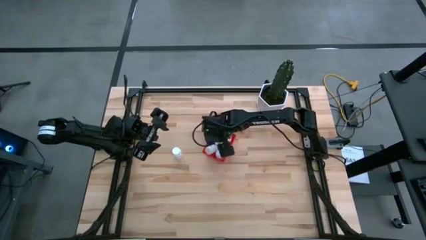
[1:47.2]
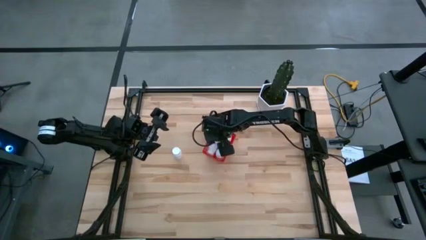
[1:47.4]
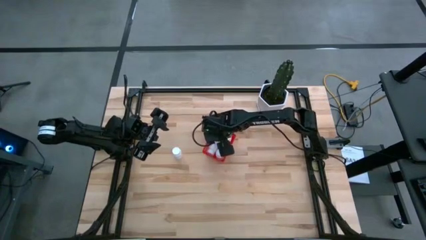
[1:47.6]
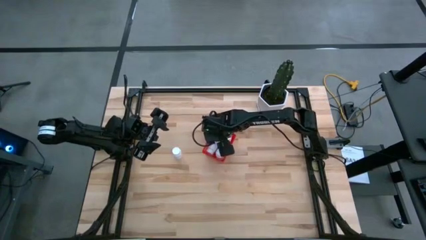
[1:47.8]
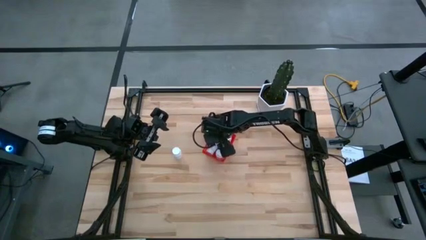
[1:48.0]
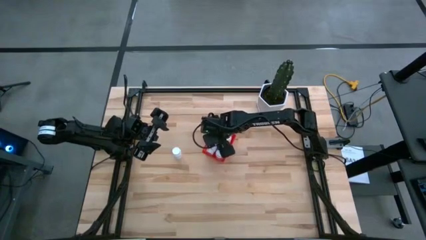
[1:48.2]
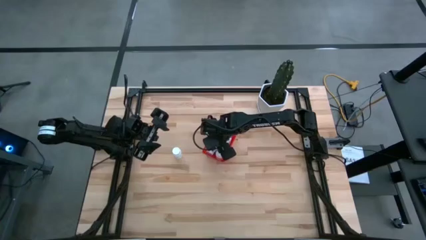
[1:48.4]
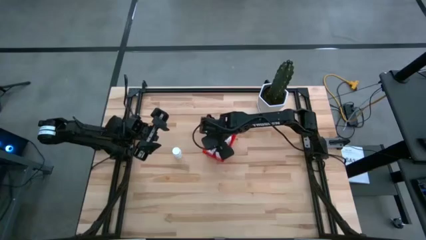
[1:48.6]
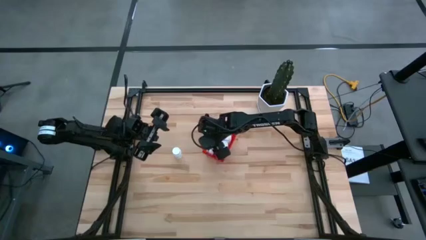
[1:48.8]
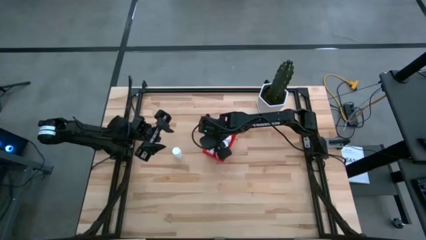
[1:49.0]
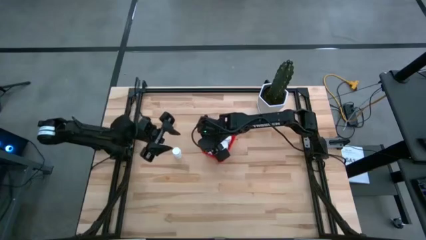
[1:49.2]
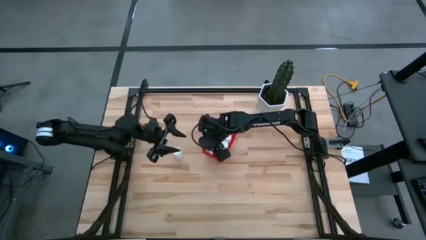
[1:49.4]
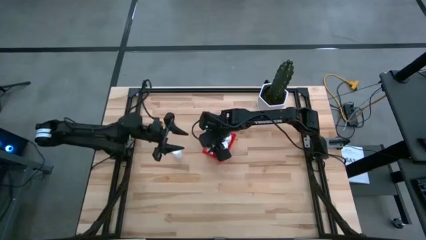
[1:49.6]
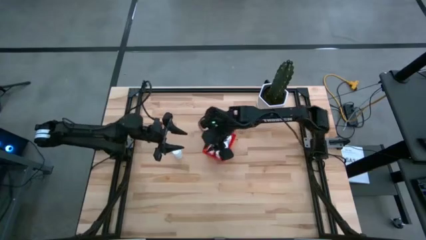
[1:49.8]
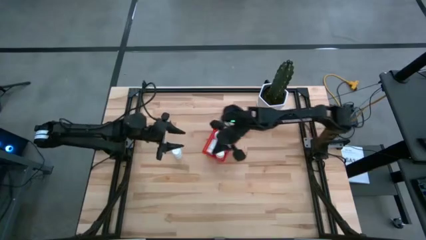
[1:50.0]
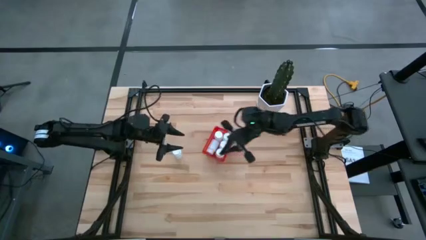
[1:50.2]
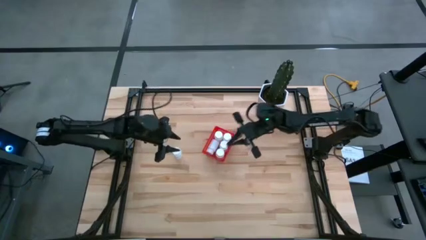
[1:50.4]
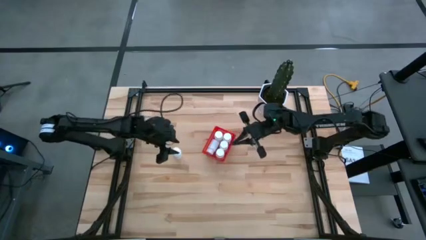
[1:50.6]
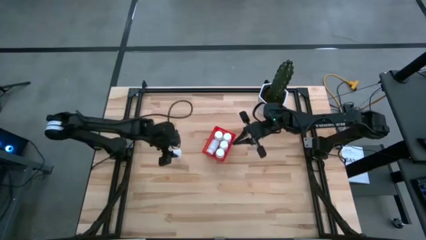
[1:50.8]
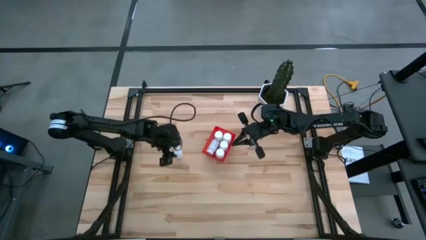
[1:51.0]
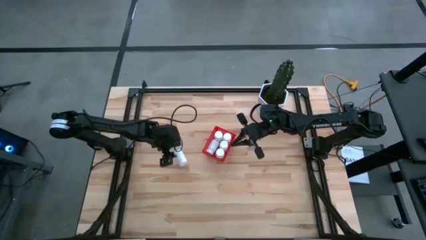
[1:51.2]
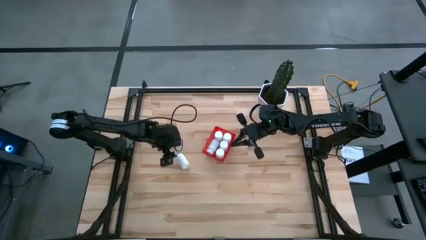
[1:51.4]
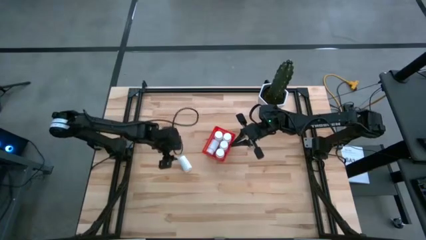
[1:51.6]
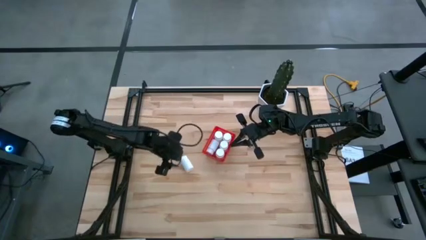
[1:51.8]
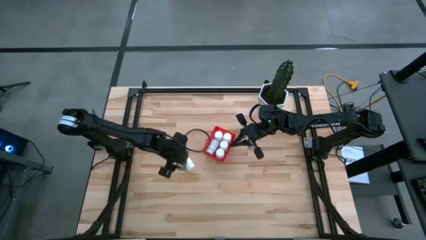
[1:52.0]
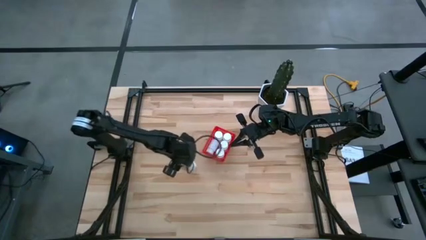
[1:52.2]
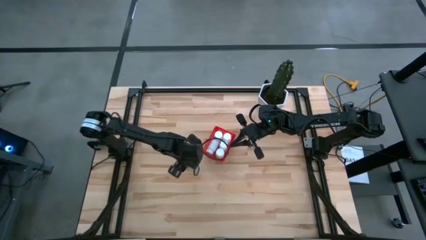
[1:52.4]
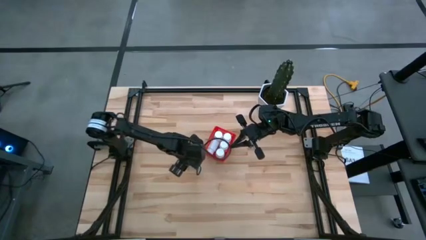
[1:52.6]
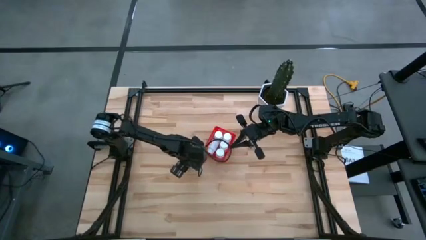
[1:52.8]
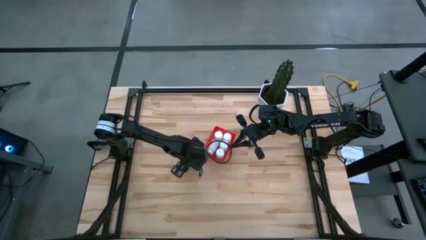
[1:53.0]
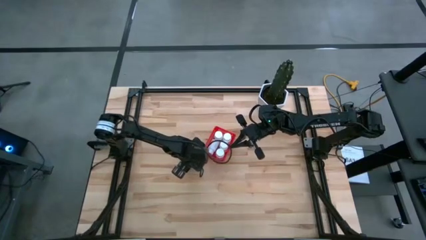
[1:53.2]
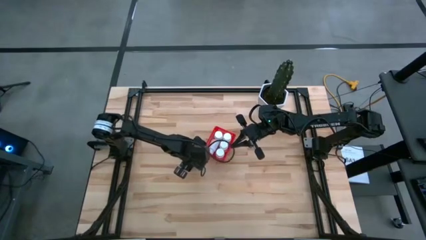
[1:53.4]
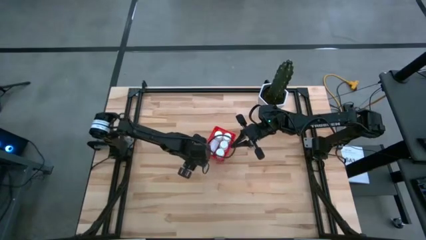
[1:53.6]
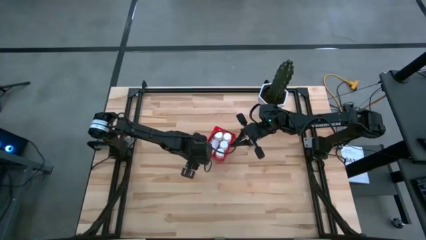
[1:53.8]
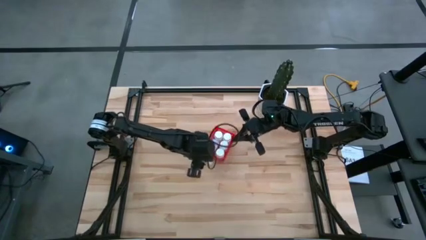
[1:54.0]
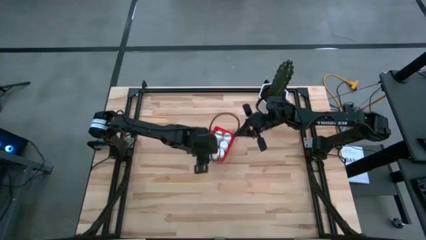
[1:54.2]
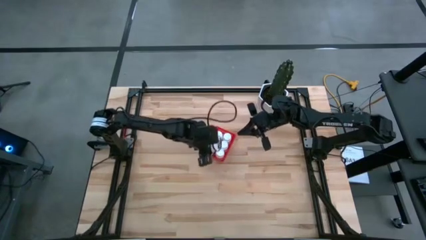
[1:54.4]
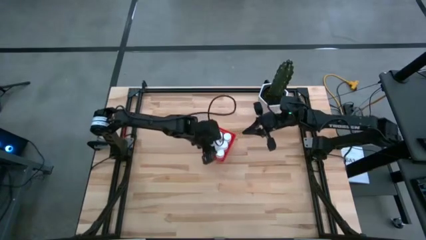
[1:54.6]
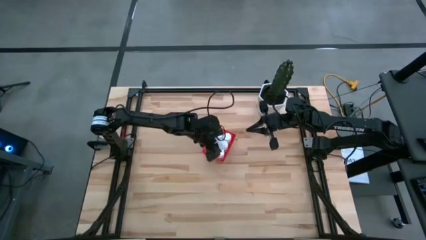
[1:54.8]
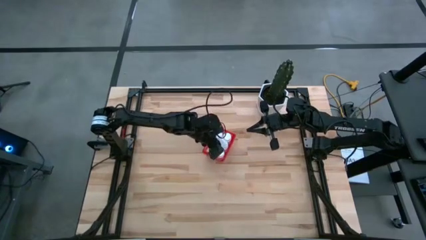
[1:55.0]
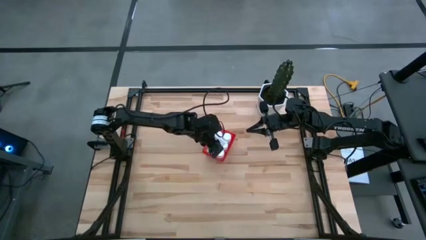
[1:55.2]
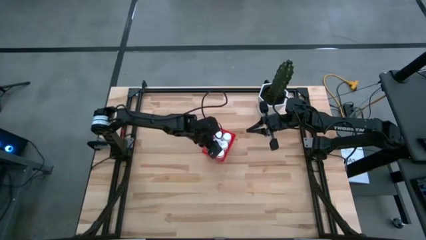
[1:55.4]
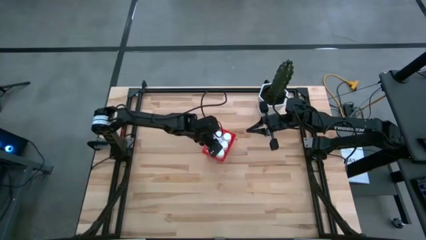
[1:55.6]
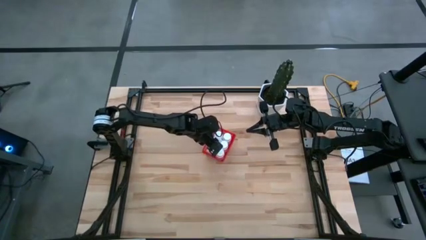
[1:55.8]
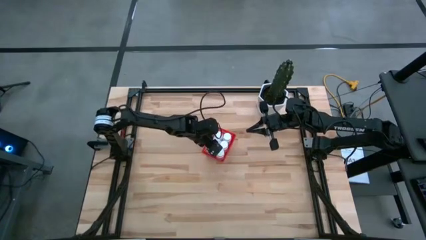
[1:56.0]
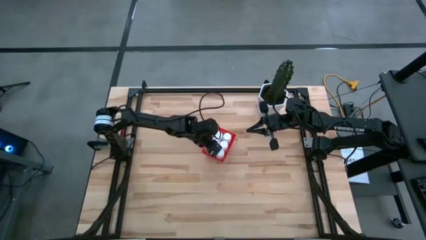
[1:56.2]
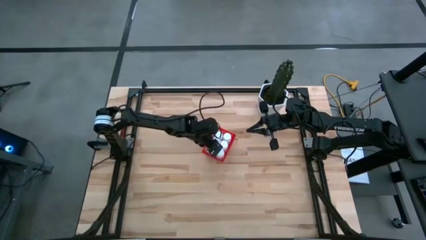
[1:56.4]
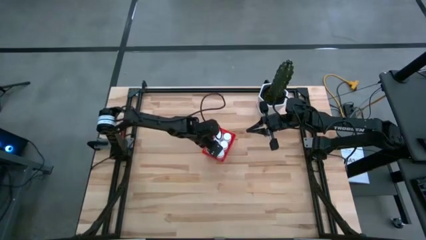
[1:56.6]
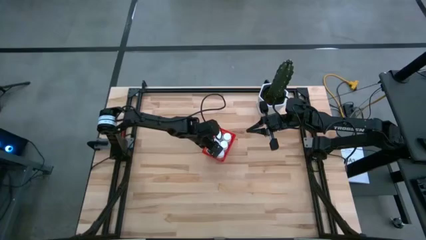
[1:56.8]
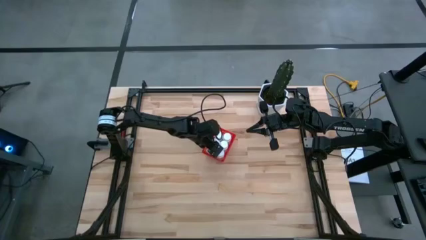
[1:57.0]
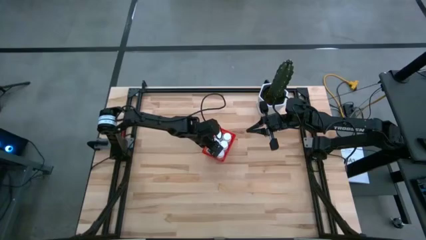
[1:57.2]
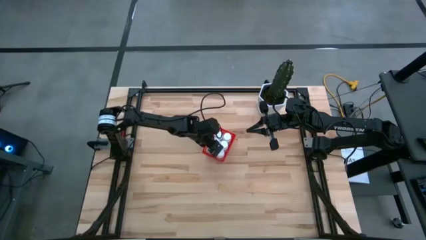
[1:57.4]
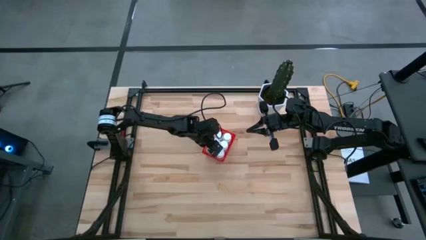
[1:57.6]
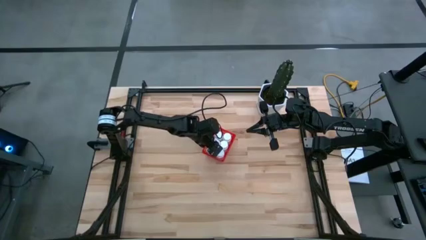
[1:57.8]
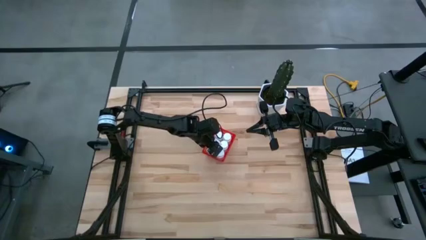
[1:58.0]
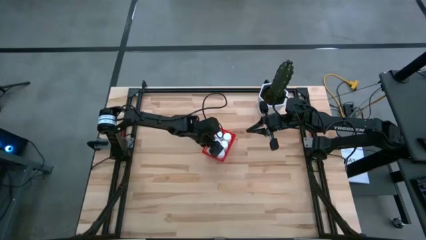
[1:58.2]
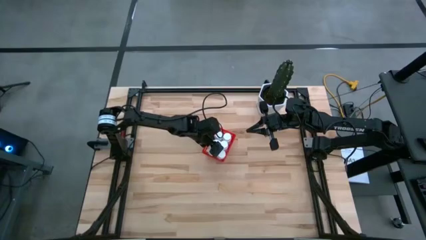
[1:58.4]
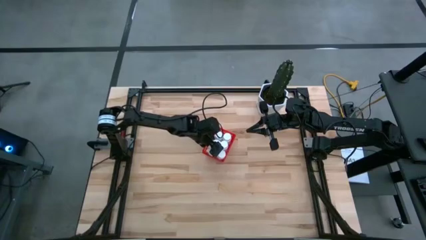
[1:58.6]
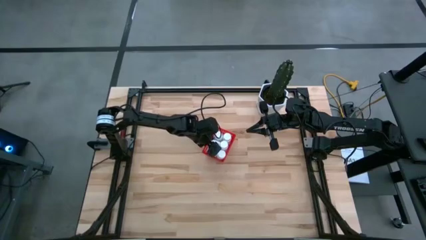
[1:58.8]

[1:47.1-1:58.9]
Task: Pick and place pill bottles into a basket
Put the pill bottle into the red bin

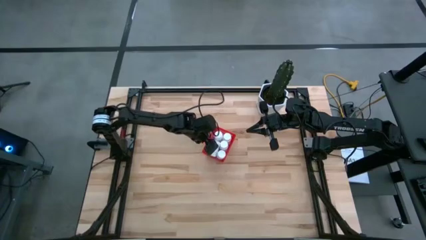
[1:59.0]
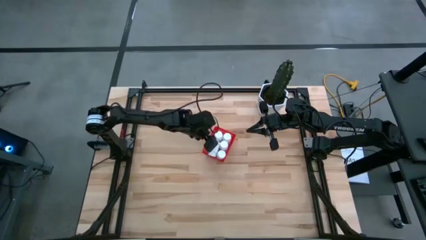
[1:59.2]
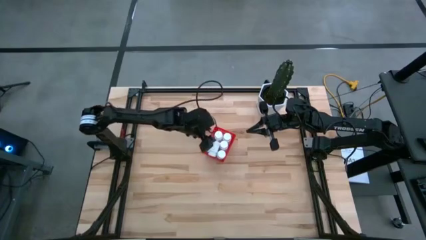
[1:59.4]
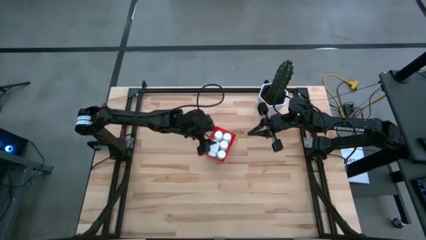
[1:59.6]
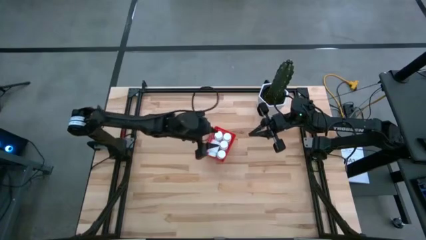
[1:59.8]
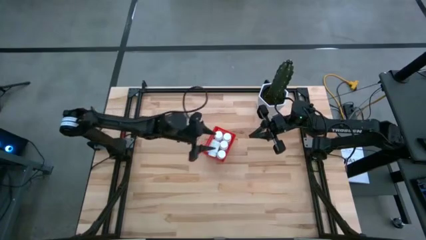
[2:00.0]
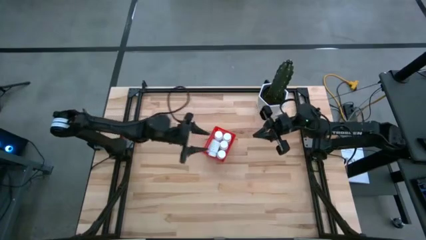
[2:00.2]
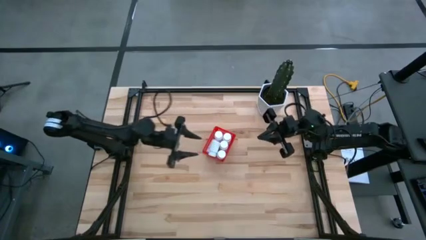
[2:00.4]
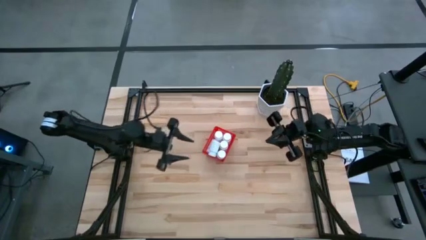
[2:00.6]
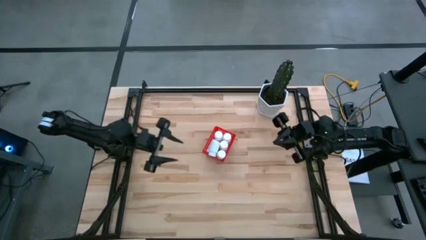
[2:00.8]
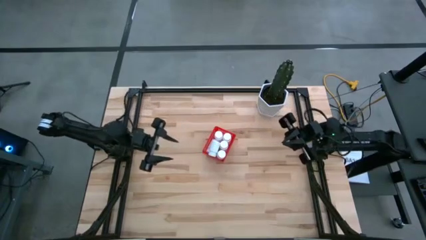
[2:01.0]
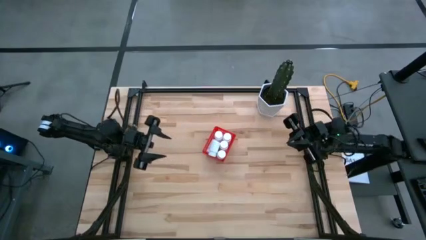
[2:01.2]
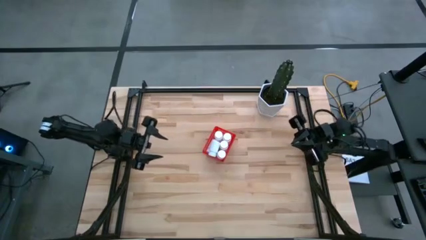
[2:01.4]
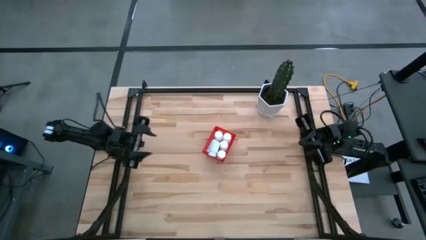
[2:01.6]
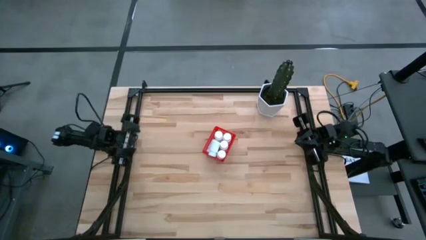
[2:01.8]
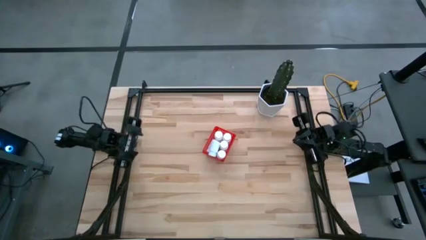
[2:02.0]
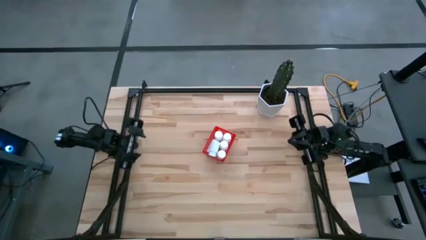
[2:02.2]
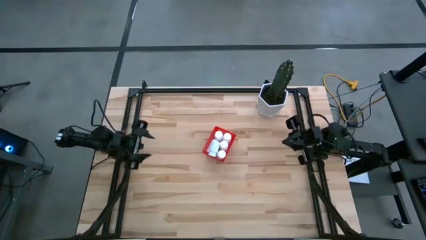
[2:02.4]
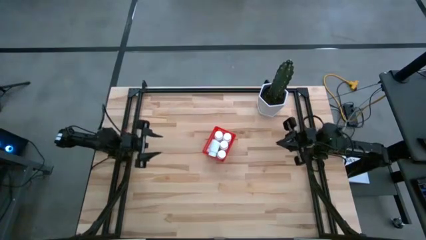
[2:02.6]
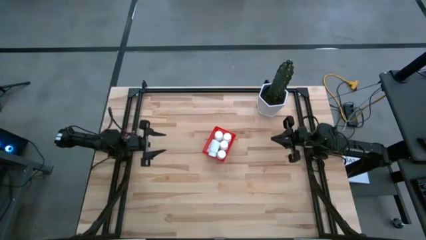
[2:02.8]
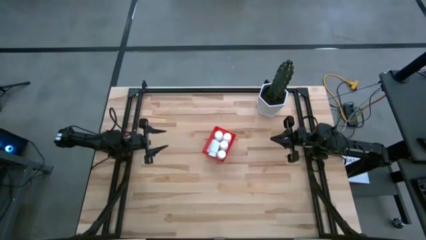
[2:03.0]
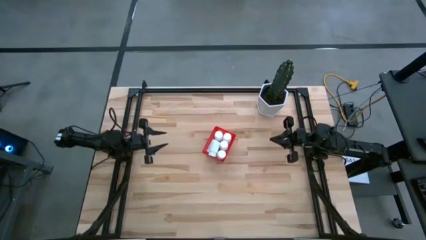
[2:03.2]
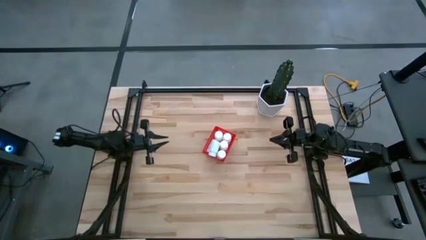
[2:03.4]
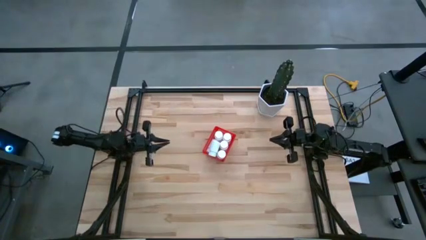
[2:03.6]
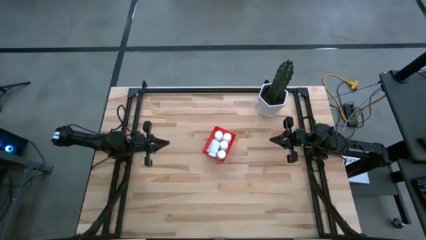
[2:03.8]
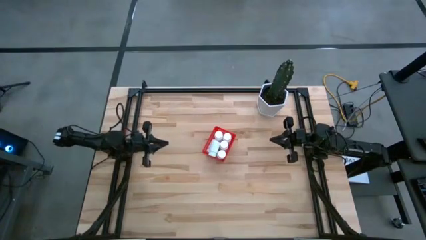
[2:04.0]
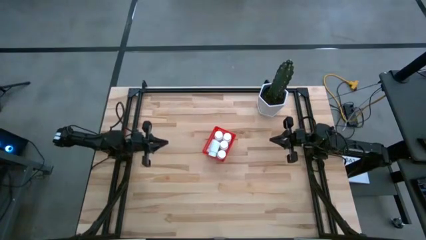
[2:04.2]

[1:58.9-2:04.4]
Return to Home Position
